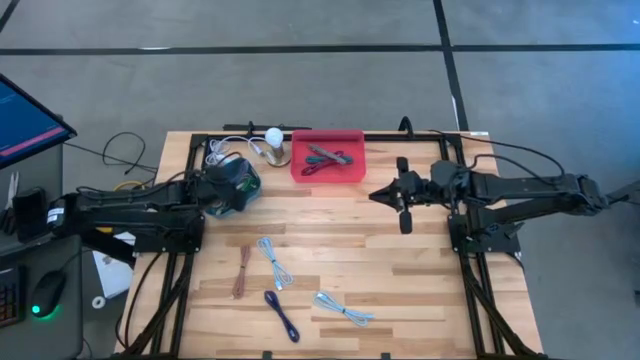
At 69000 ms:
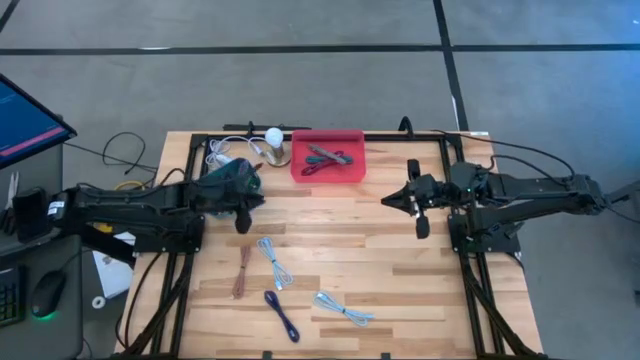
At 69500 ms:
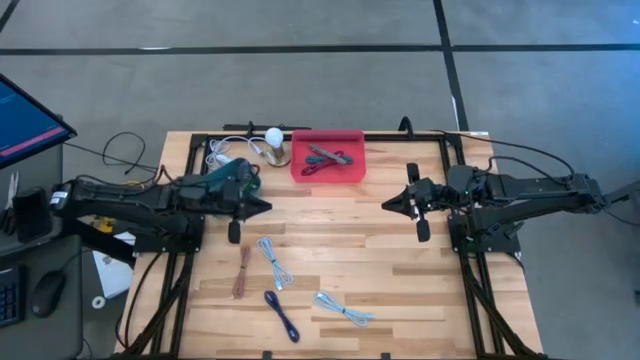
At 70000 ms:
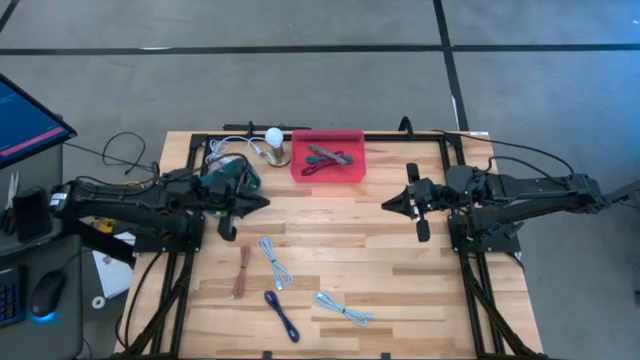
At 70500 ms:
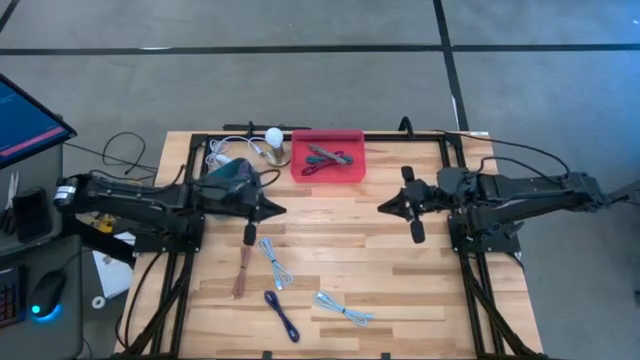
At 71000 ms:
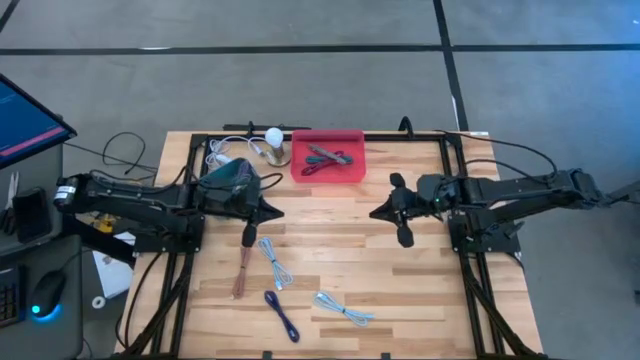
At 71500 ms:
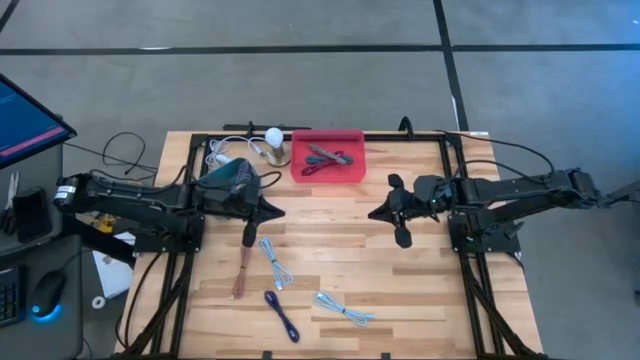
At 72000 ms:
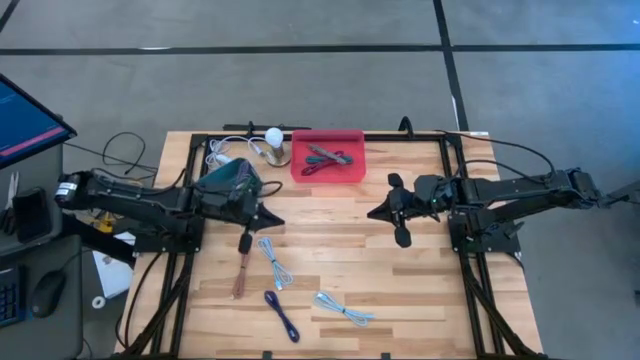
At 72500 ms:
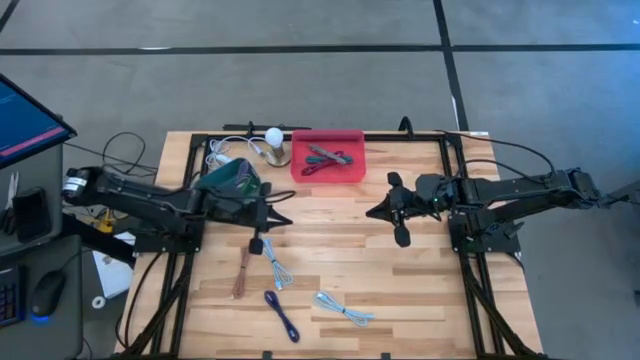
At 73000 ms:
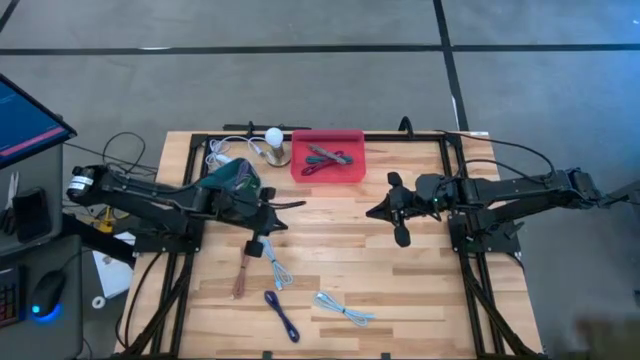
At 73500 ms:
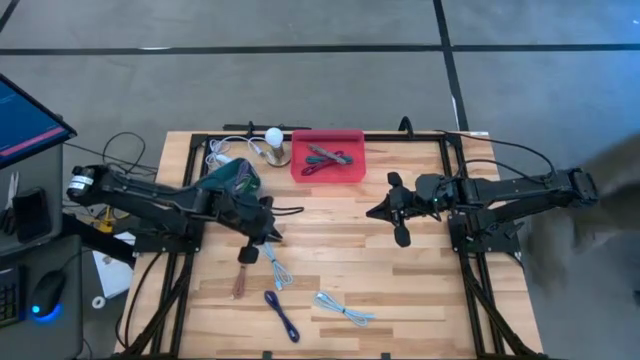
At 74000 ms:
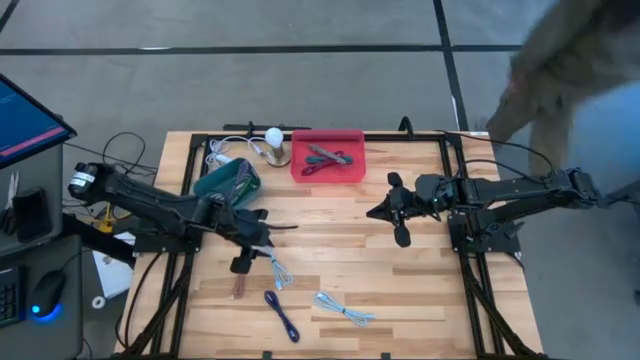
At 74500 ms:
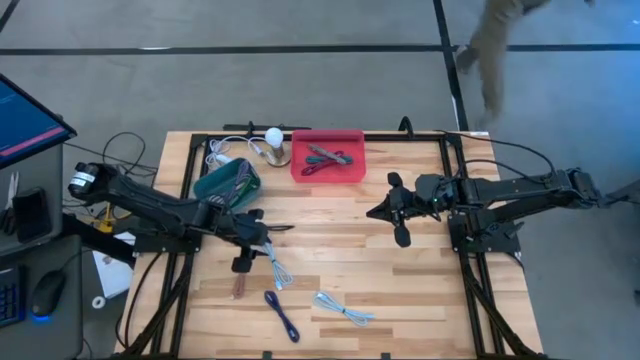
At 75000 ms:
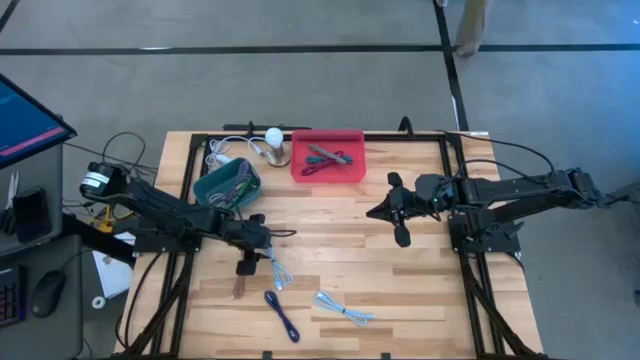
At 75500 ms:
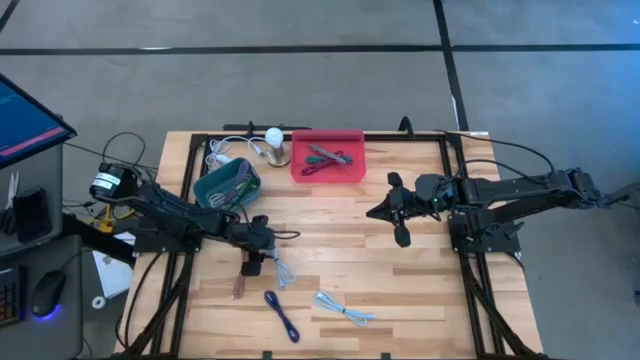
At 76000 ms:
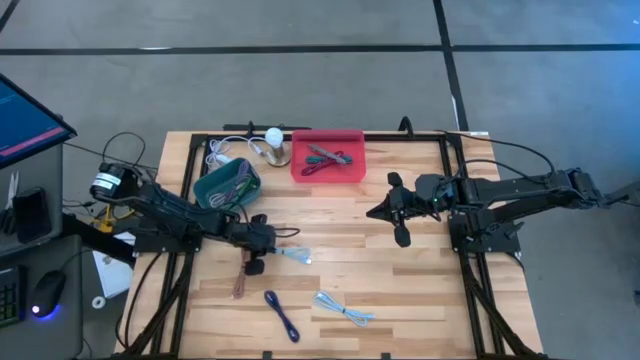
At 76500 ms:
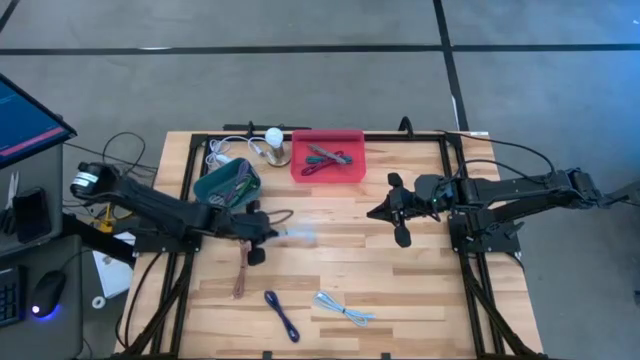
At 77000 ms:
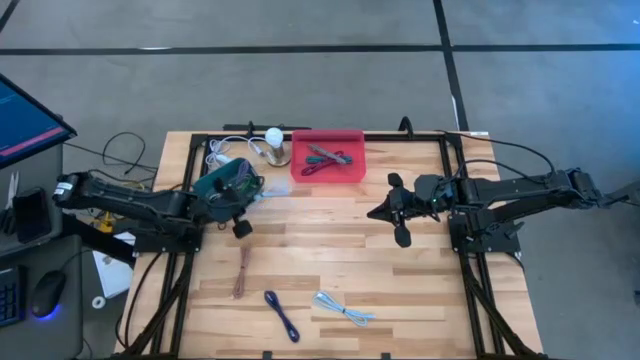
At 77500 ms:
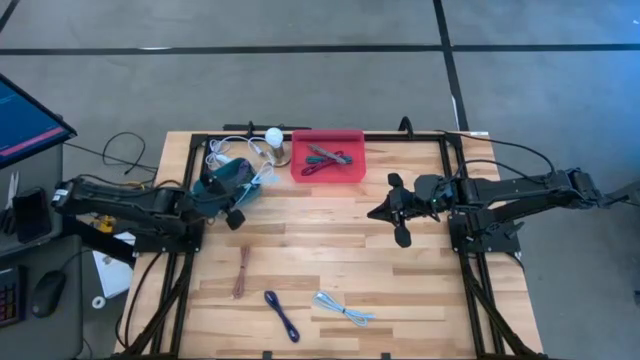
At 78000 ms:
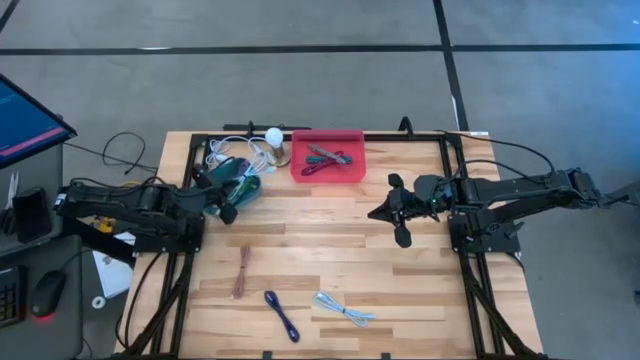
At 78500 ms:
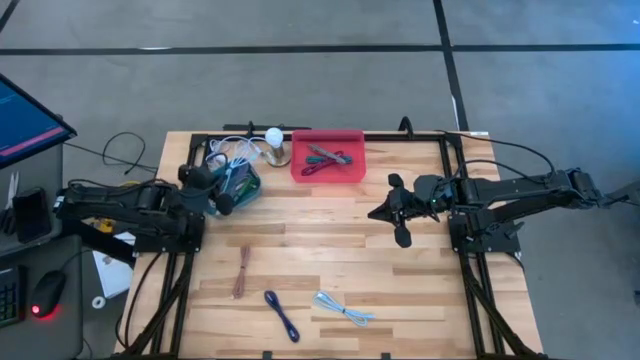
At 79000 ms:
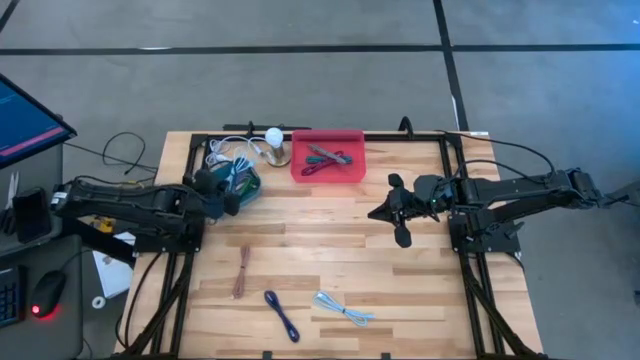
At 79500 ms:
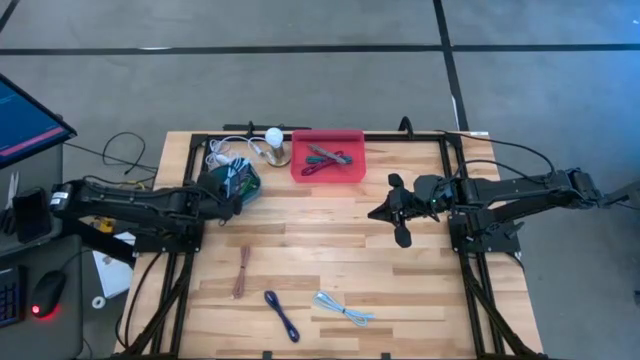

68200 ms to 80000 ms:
Task: Pick & Place USB Port
Put the top blue USB cable into the blue bin

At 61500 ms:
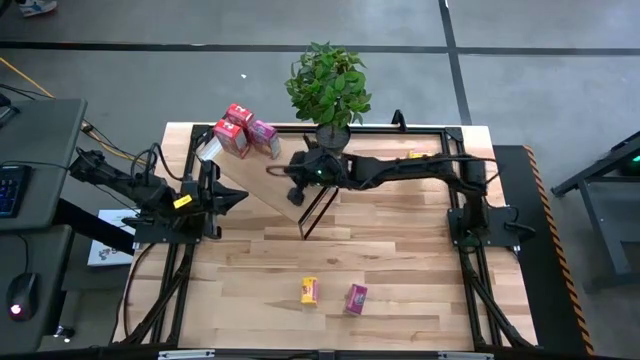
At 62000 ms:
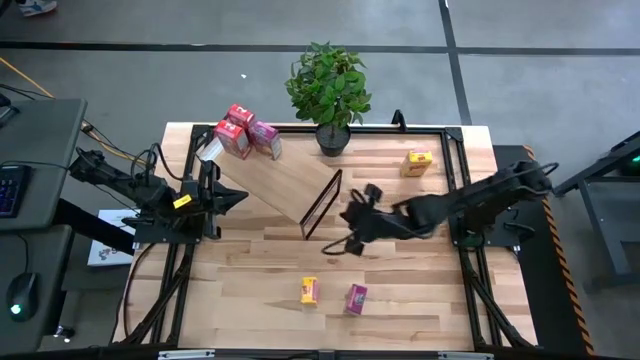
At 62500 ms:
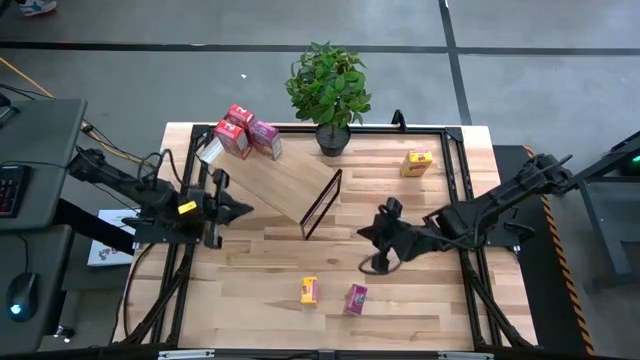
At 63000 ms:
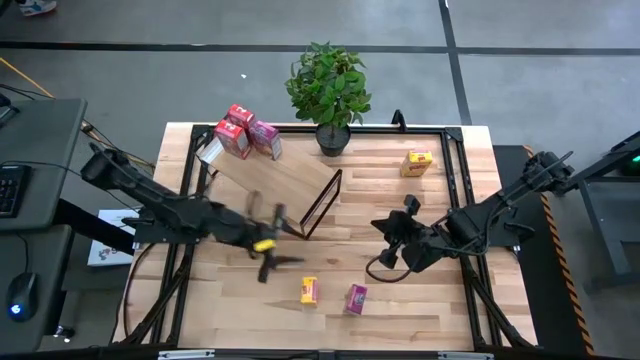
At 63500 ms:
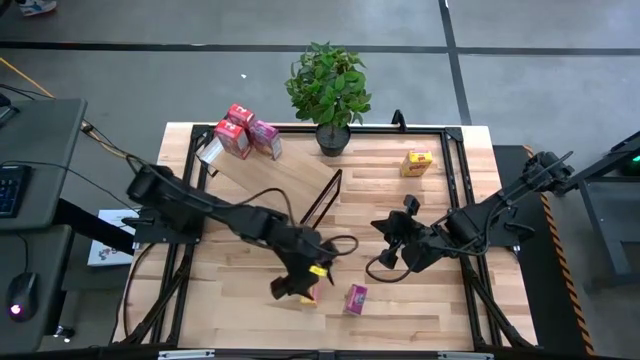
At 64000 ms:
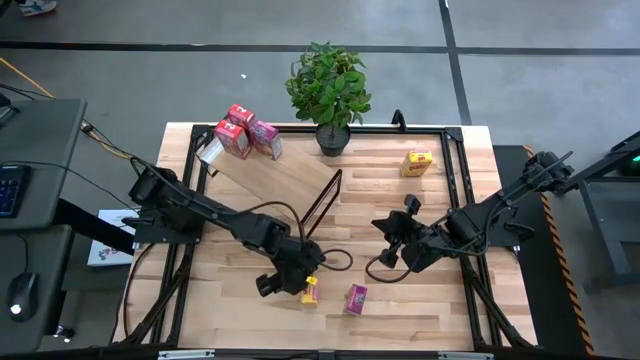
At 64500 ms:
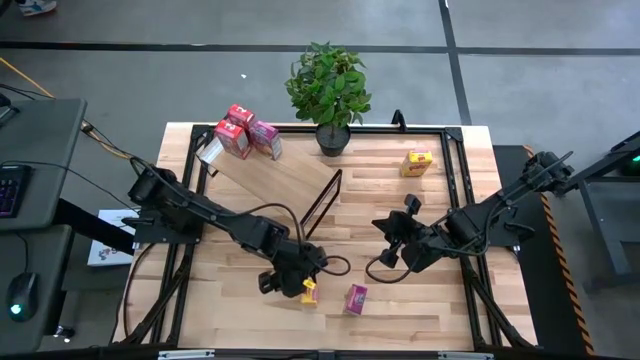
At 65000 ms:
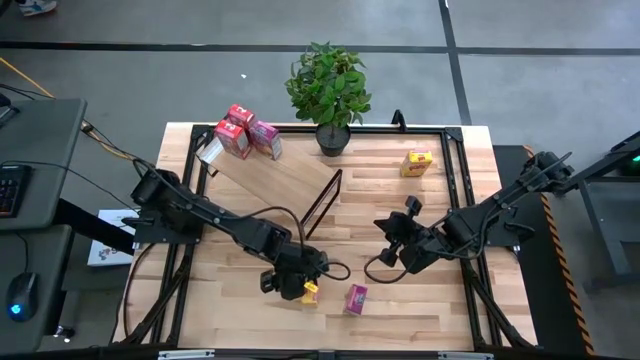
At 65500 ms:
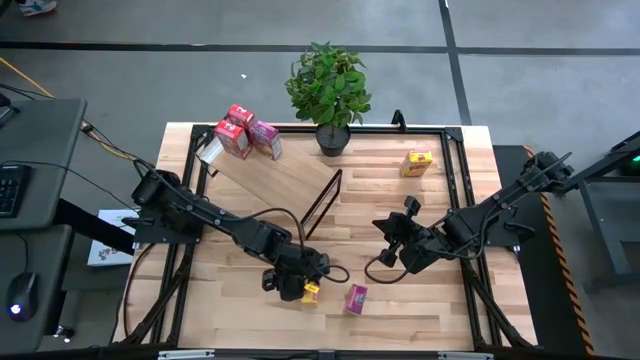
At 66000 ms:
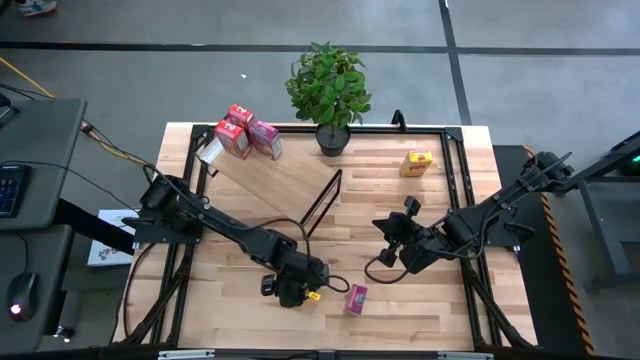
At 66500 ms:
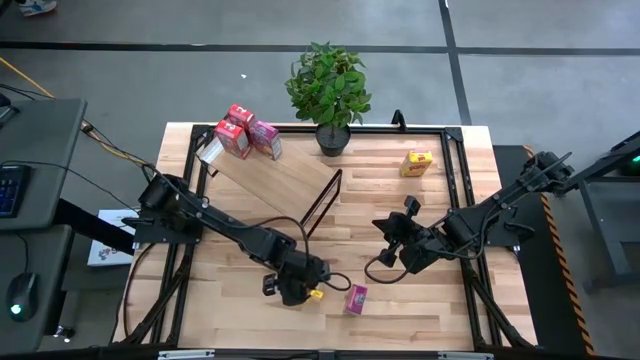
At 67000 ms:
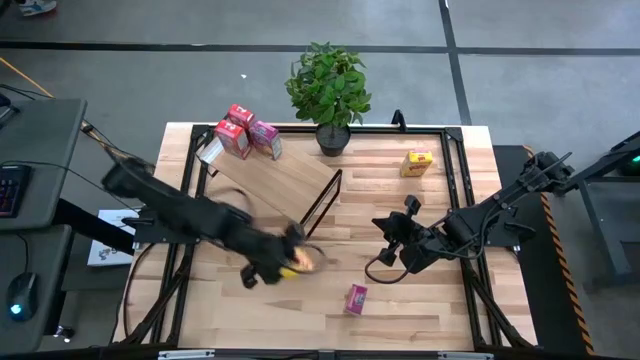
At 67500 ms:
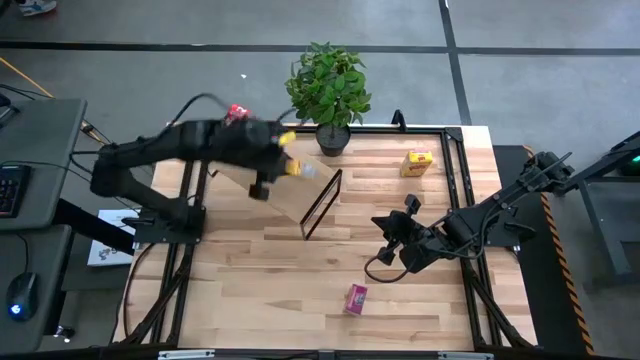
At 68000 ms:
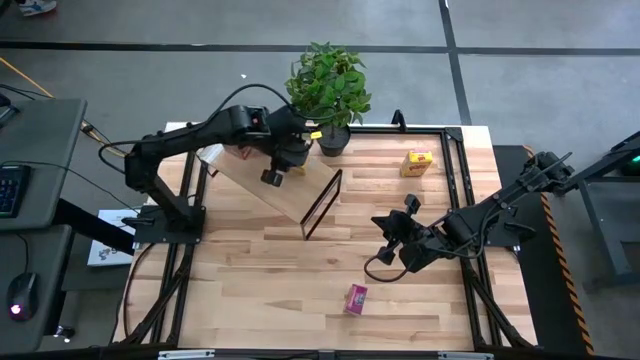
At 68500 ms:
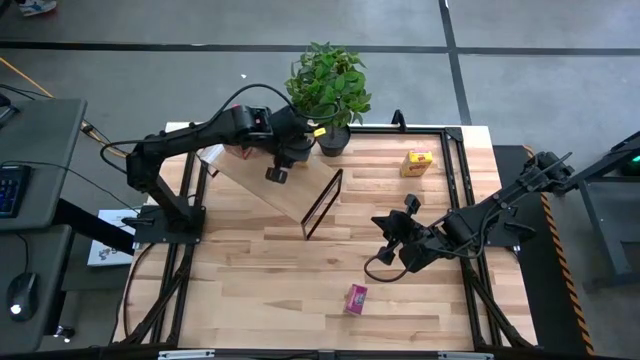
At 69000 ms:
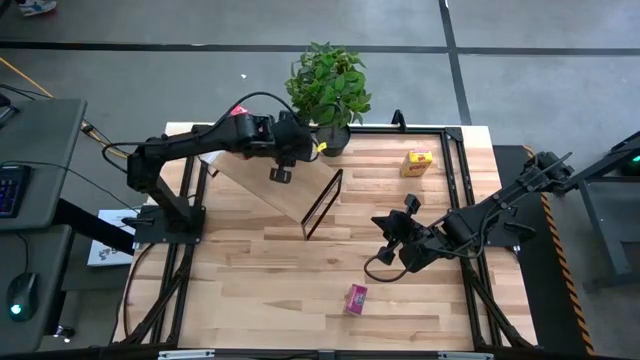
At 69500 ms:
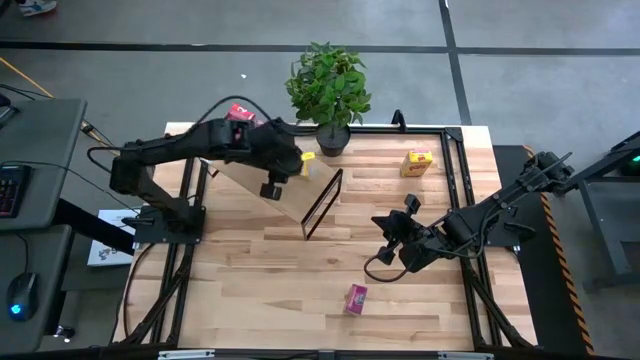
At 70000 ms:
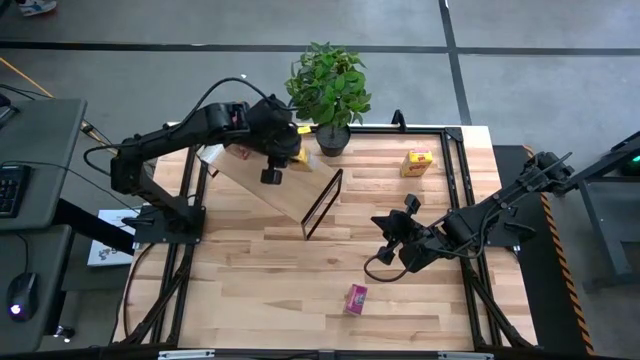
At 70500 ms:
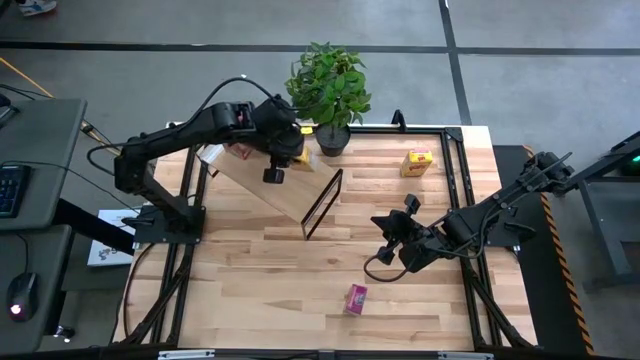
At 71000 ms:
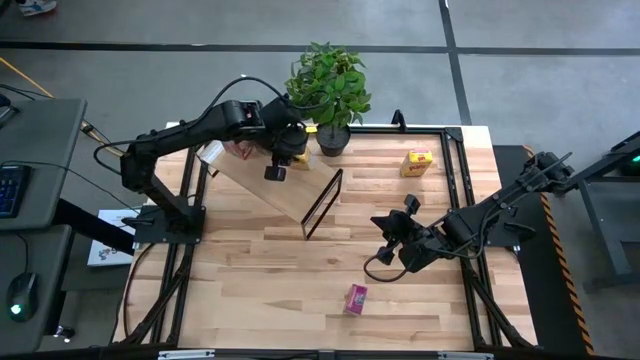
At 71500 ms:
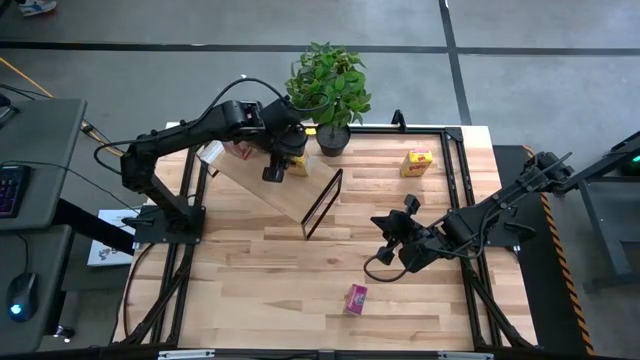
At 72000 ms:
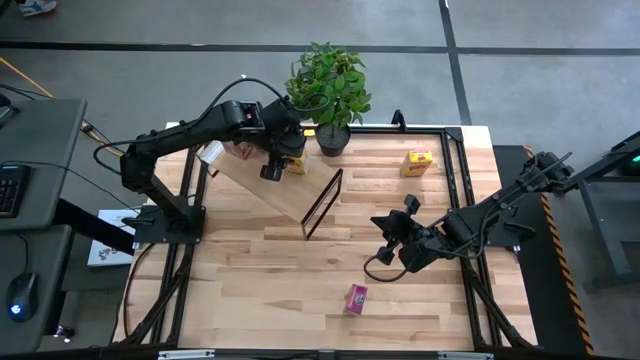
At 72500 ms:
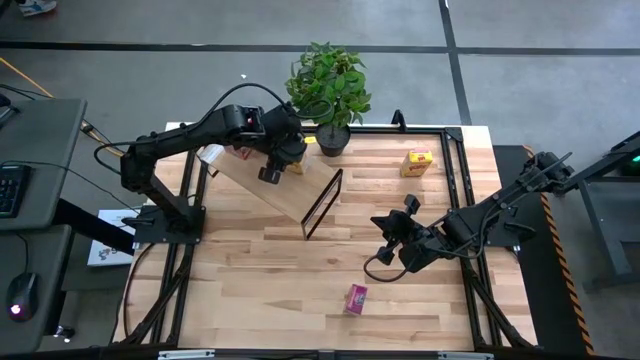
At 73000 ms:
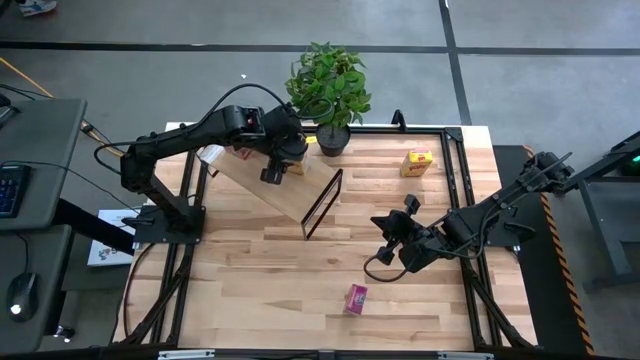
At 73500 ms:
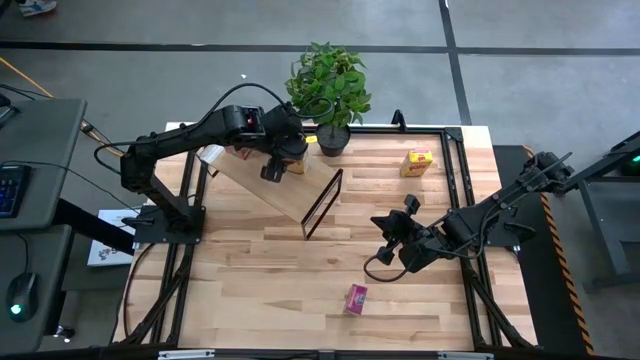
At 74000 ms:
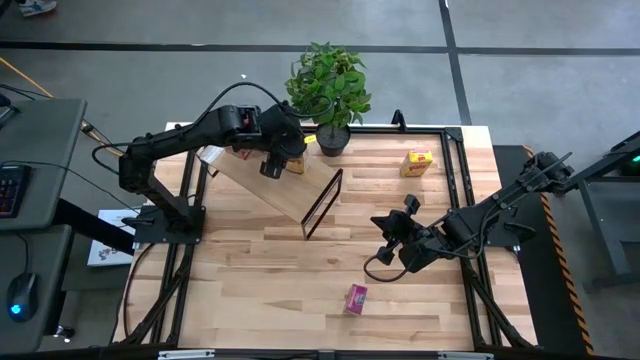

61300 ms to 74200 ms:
Task: Stack cereal on shelf
Put the bottom yellow cereal box on the shelf
